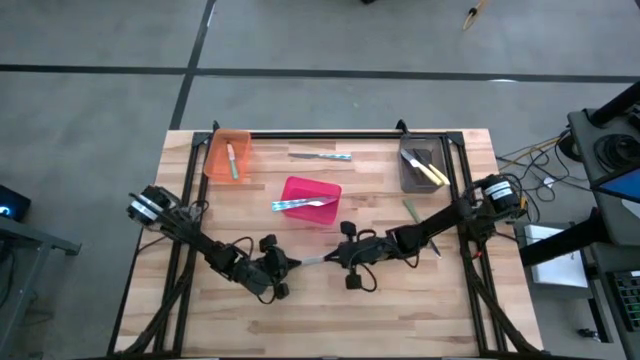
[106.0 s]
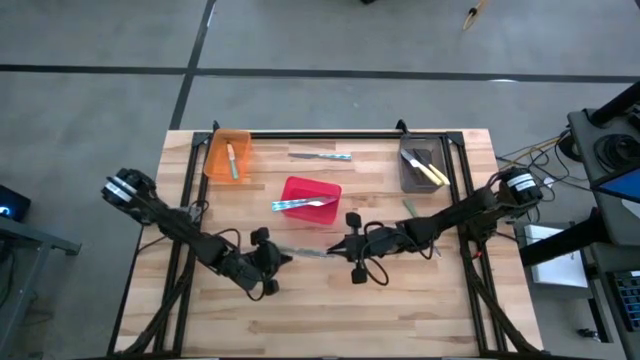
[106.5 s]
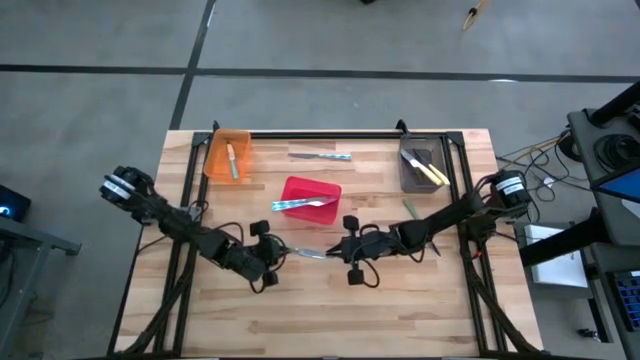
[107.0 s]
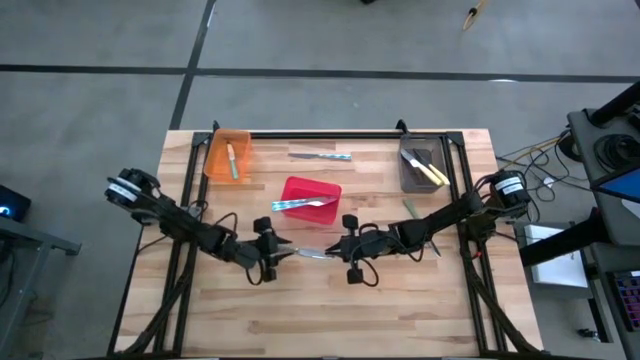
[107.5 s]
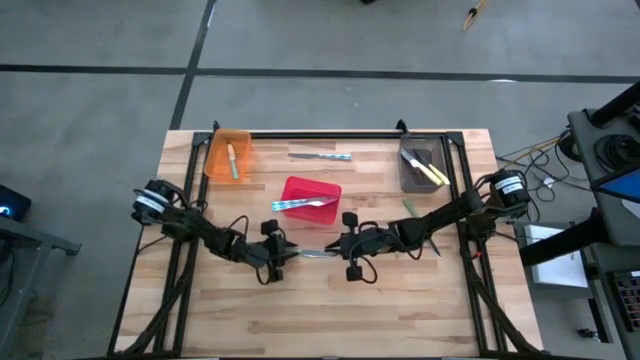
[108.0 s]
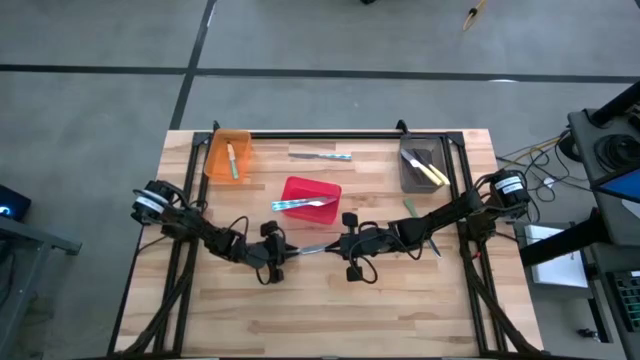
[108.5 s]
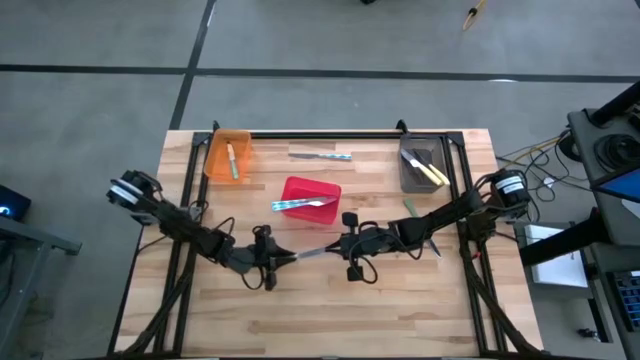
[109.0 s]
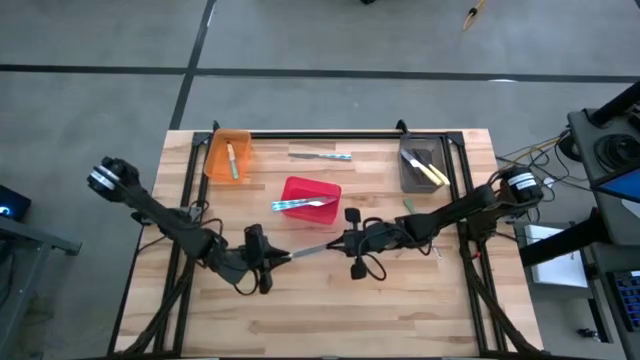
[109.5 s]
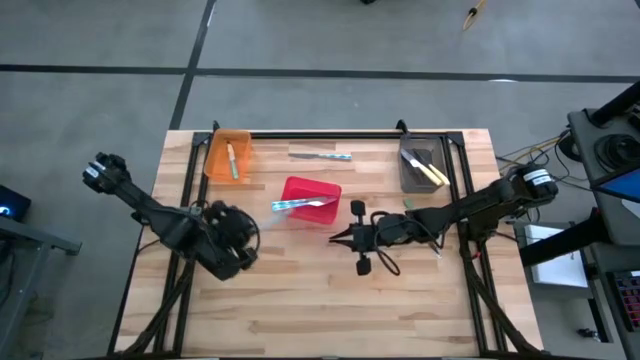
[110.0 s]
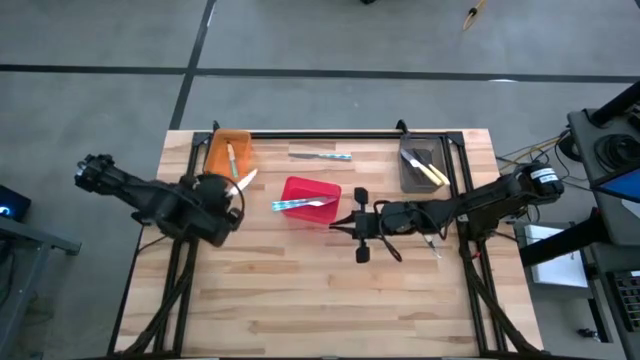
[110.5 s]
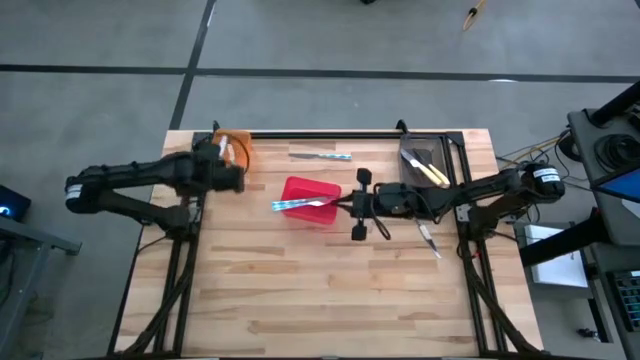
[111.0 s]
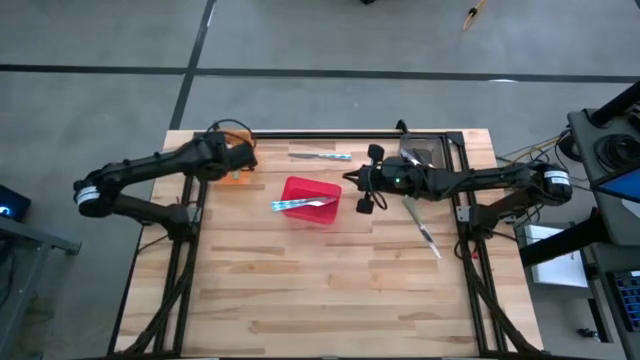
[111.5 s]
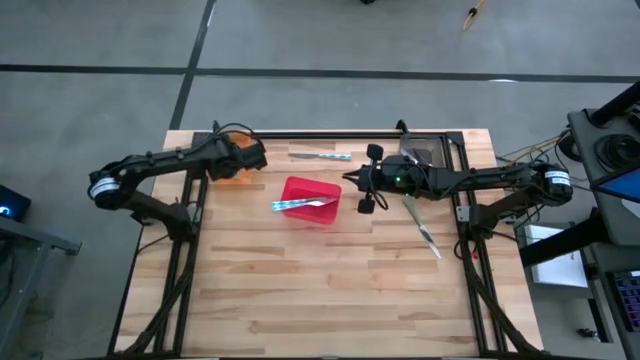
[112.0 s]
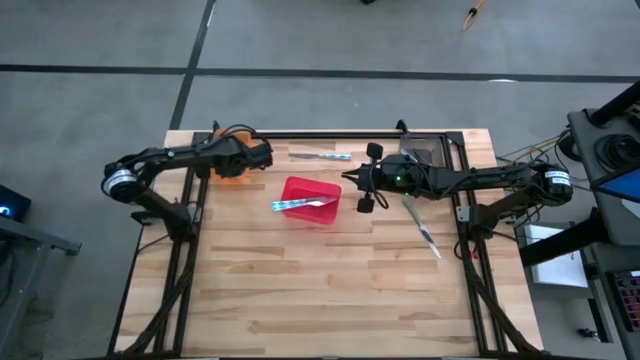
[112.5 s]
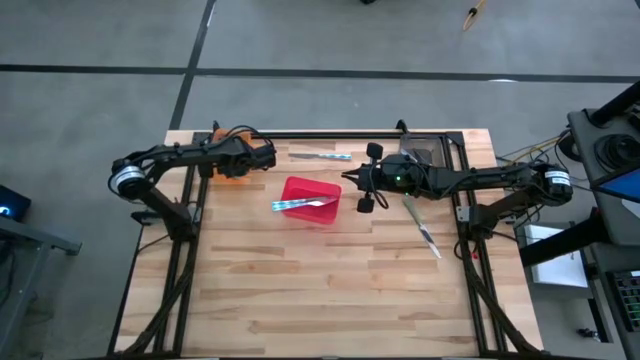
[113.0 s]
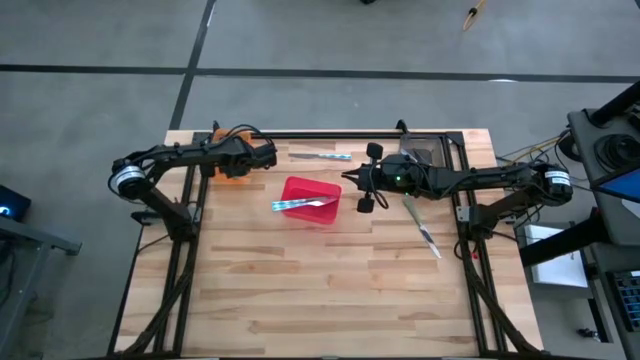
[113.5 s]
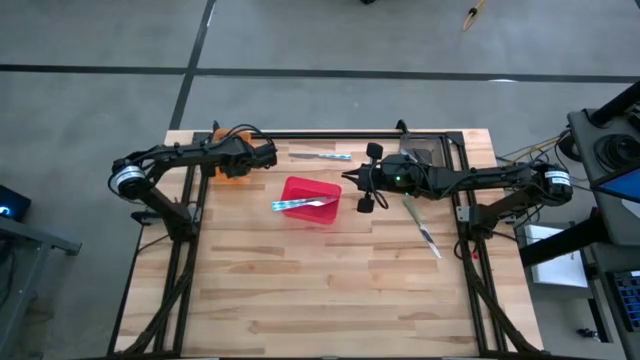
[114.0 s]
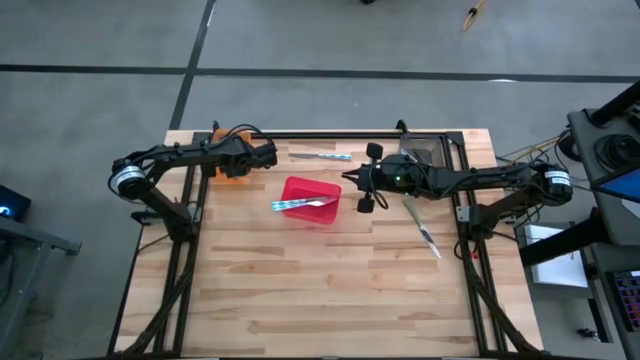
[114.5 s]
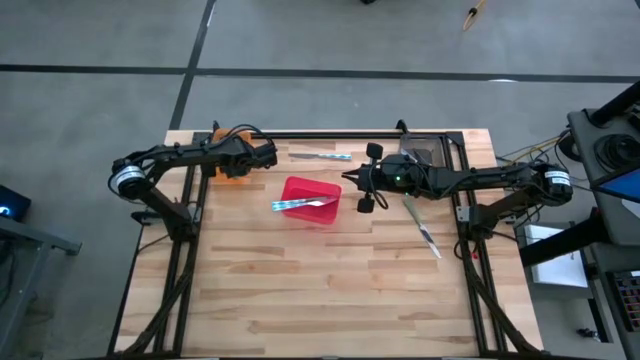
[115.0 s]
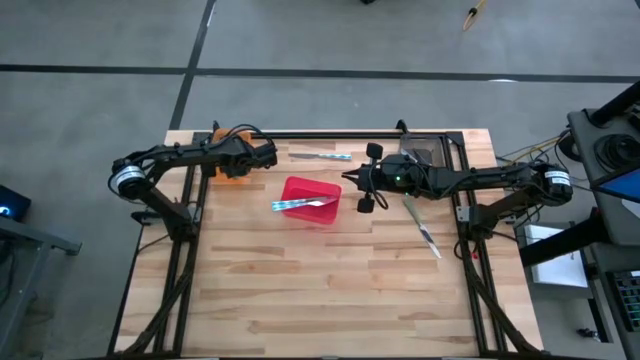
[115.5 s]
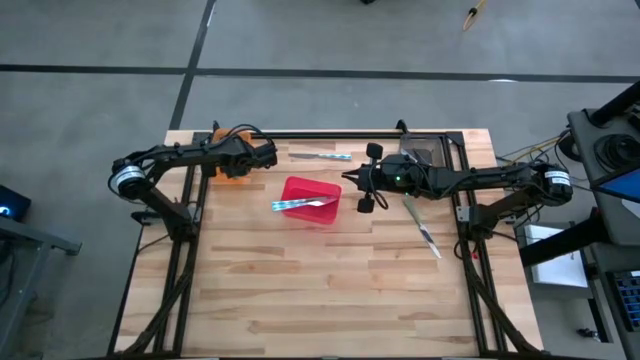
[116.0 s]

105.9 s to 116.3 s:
Task: Sort silverware by color (type)
Put the bottom green table knife into the orange bin

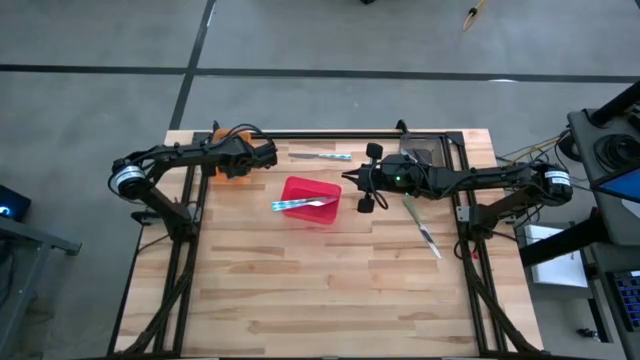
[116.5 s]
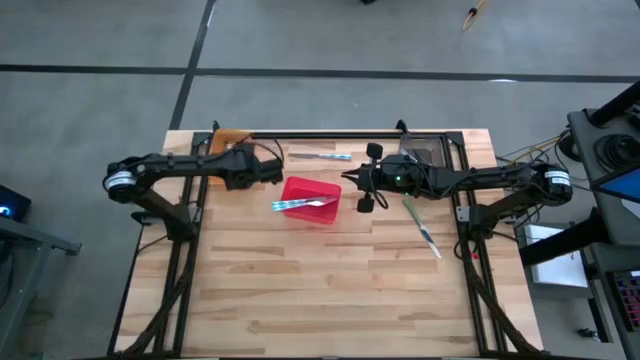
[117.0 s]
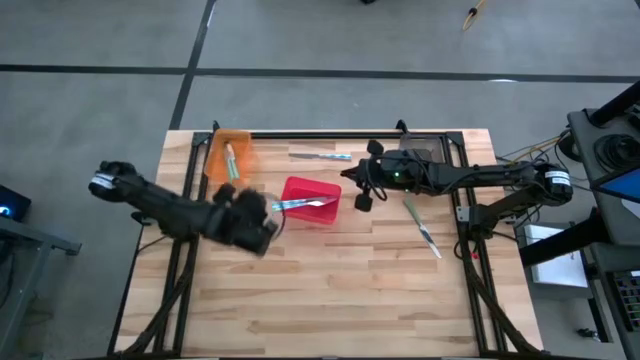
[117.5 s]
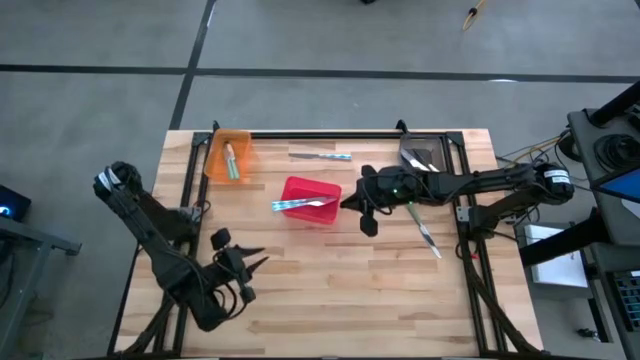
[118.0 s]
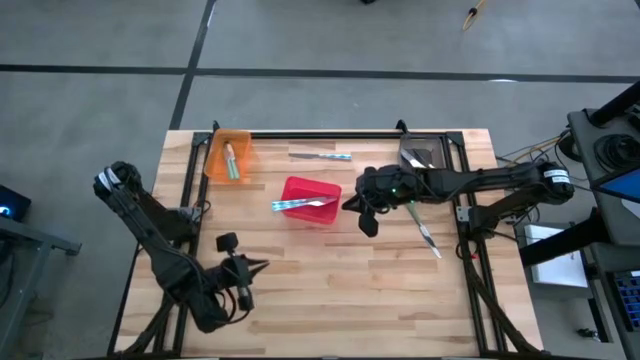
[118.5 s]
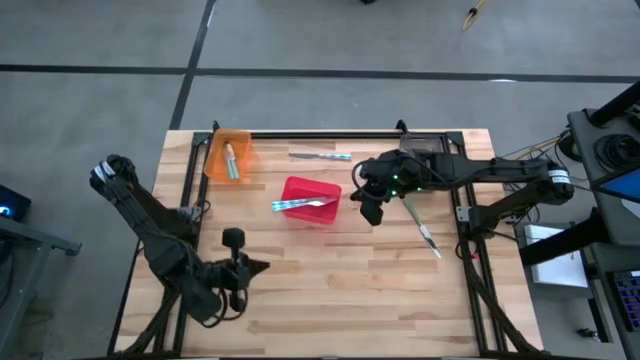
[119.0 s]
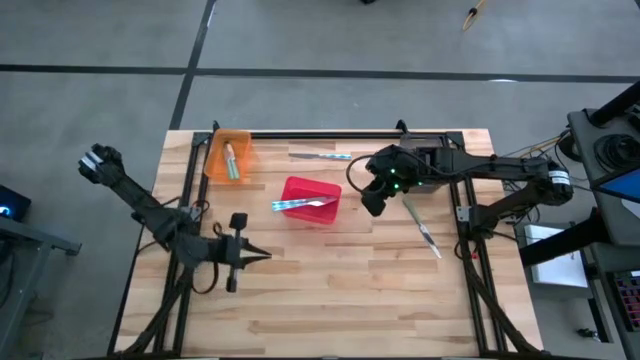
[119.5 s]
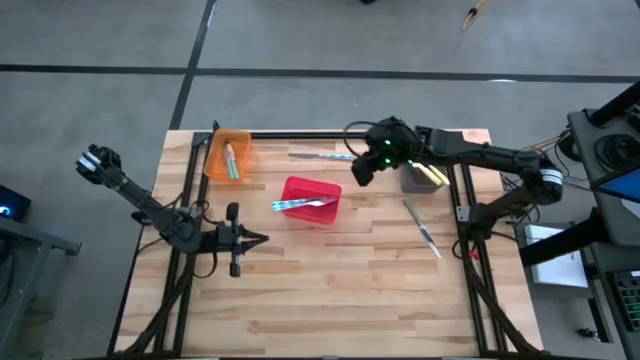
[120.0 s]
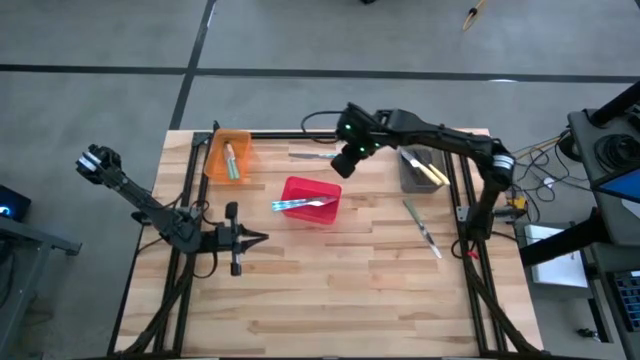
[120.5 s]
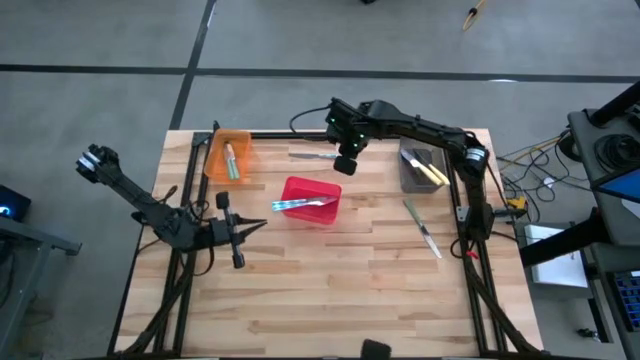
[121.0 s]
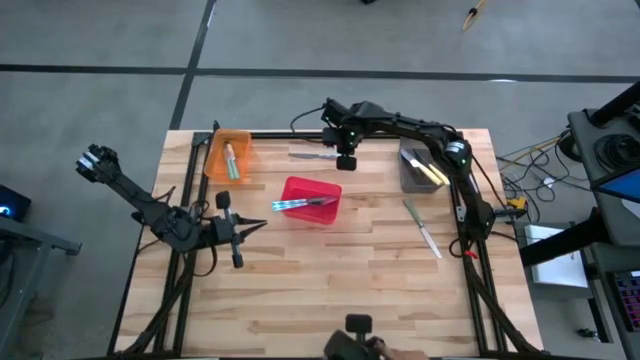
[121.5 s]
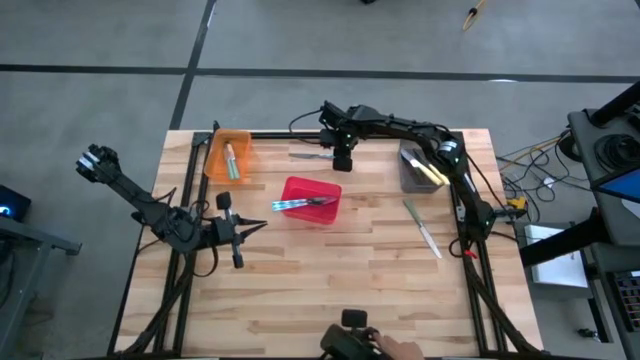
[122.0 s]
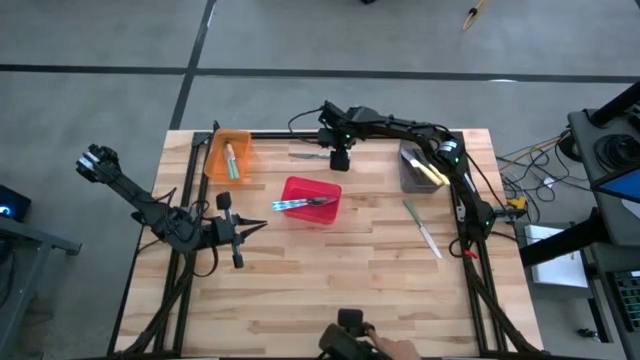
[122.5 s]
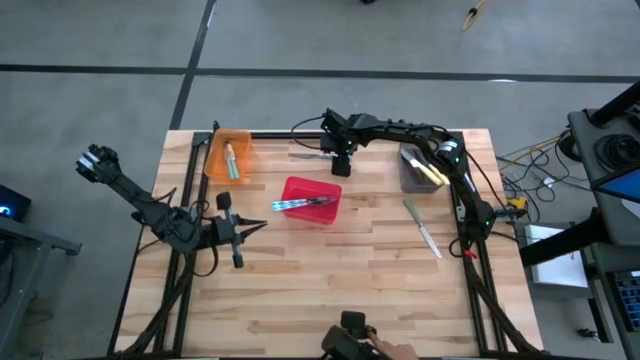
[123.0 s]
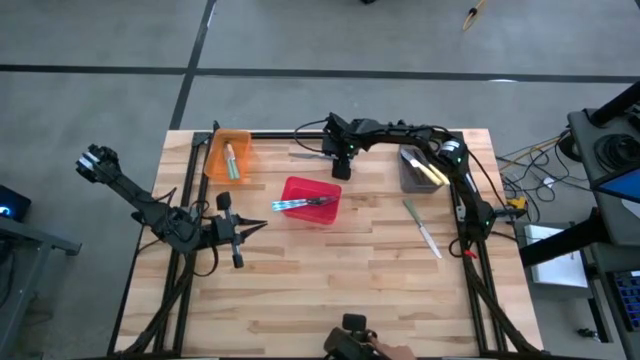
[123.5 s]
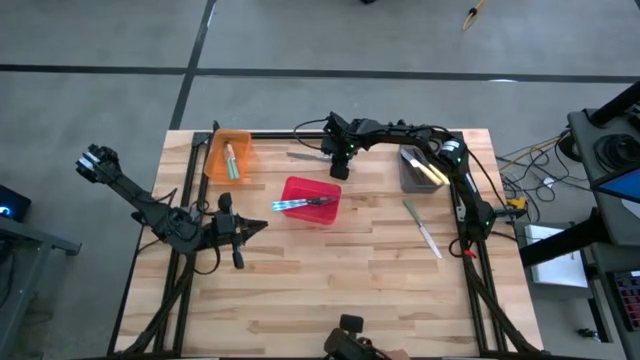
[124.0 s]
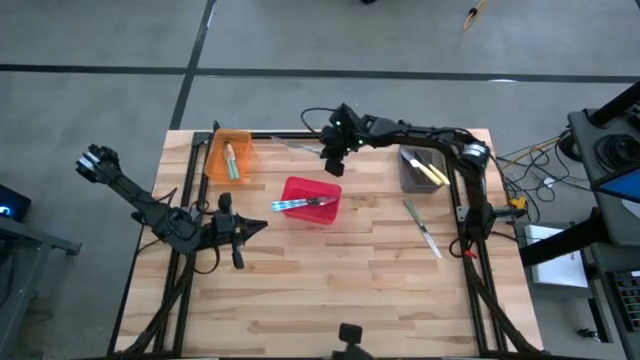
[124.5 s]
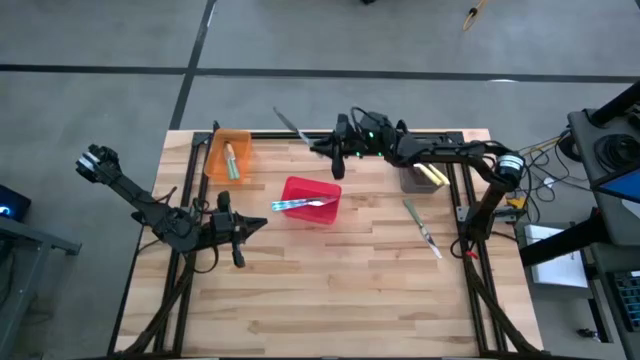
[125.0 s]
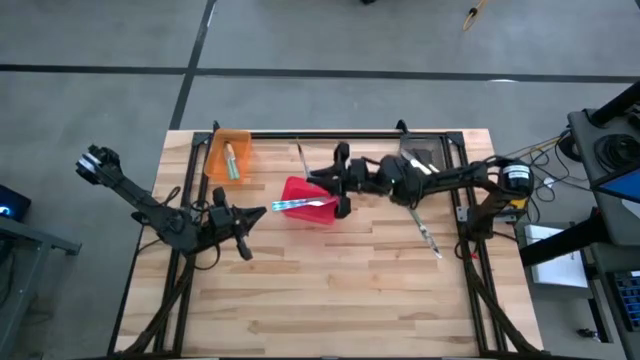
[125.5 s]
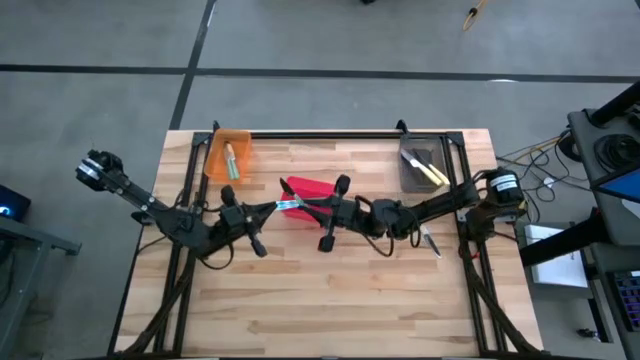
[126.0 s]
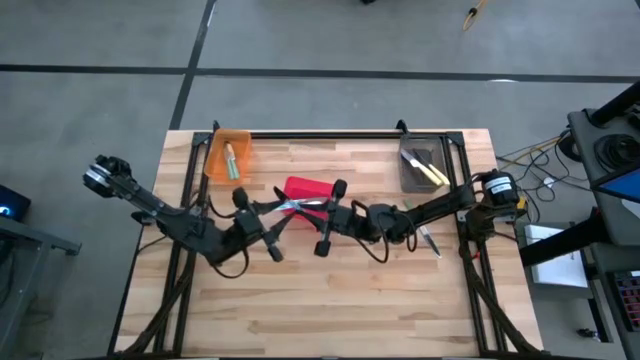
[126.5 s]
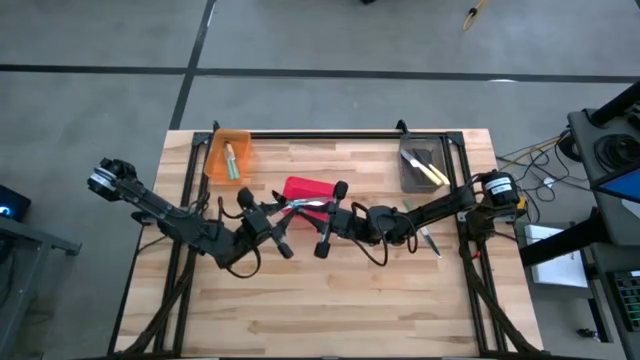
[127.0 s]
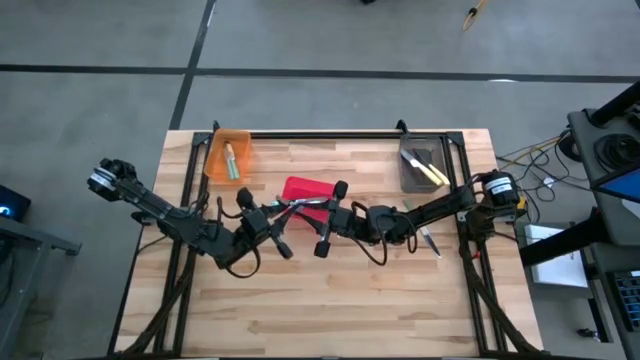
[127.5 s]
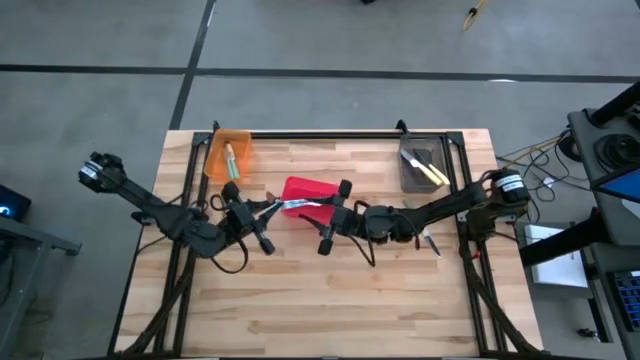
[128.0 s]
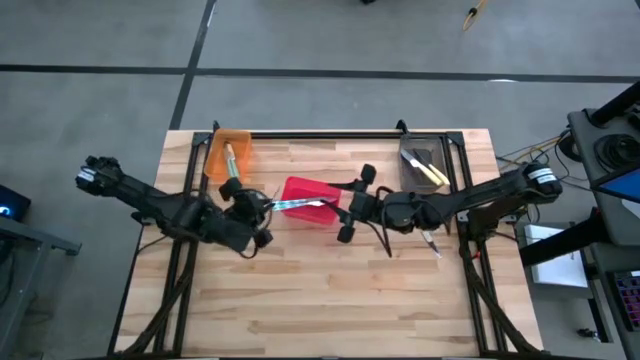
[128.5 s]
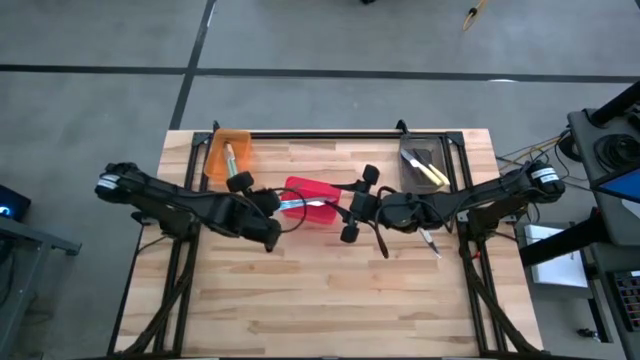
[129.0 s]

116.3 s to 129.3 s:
Put the white patterned table knife into the red bin
